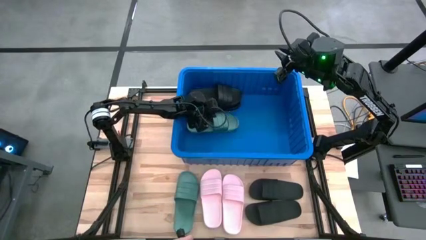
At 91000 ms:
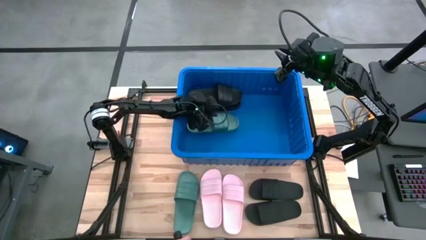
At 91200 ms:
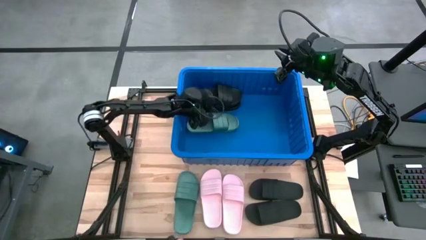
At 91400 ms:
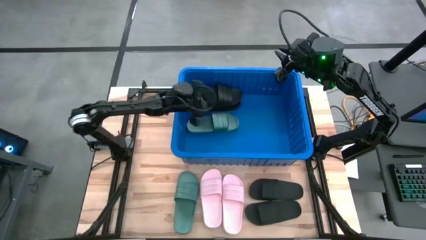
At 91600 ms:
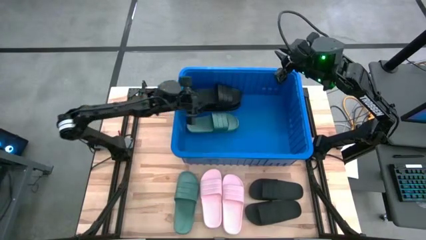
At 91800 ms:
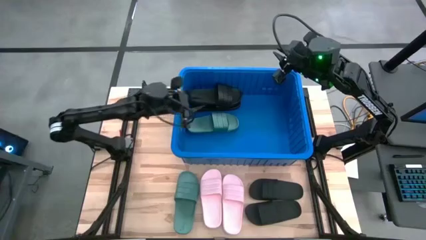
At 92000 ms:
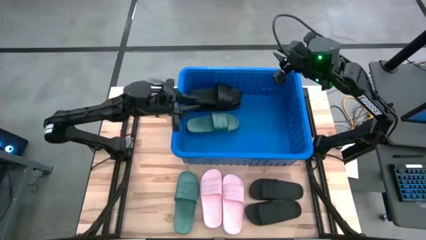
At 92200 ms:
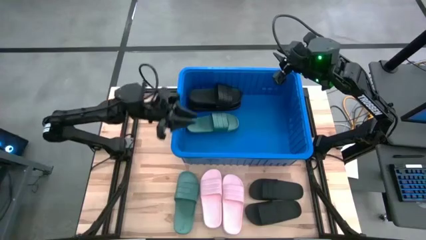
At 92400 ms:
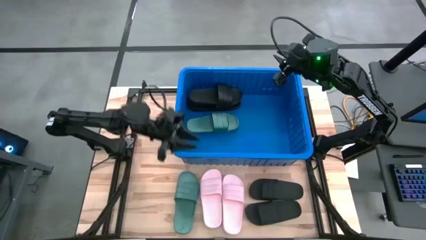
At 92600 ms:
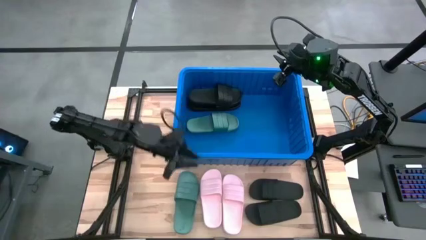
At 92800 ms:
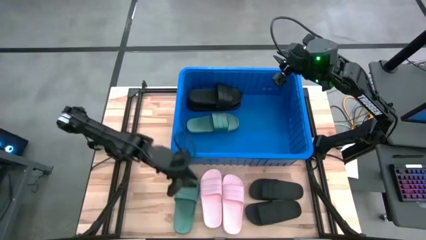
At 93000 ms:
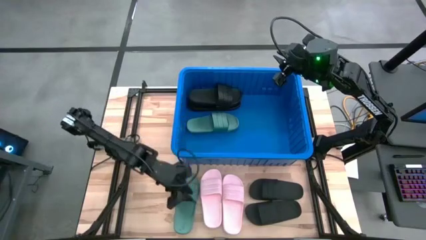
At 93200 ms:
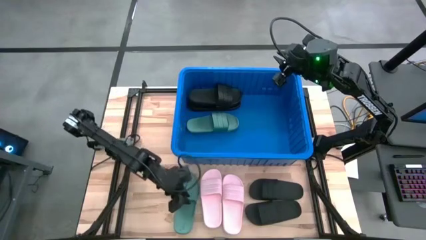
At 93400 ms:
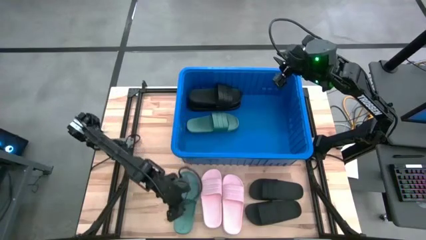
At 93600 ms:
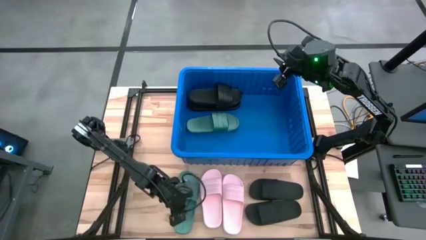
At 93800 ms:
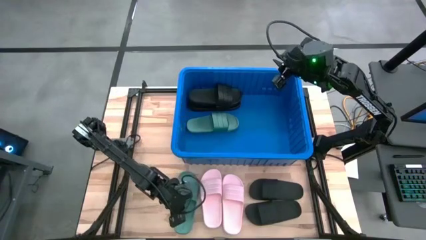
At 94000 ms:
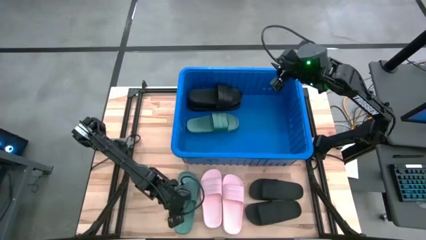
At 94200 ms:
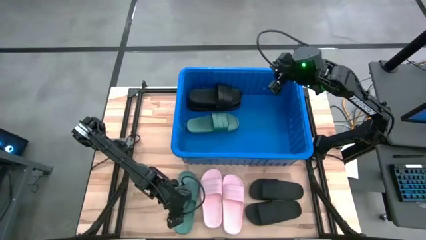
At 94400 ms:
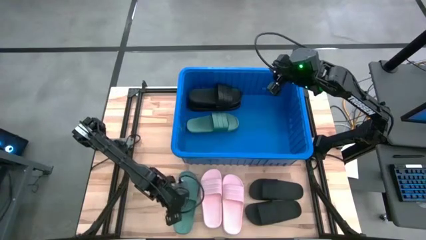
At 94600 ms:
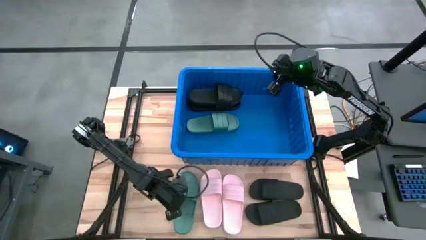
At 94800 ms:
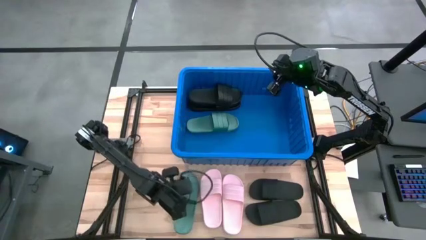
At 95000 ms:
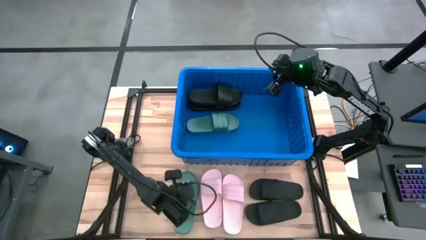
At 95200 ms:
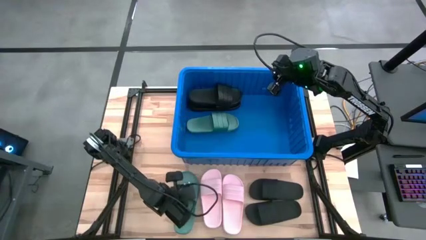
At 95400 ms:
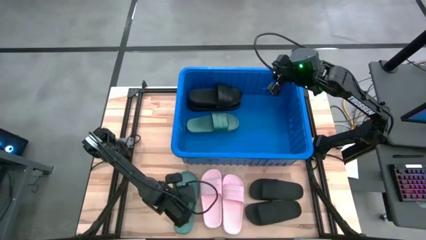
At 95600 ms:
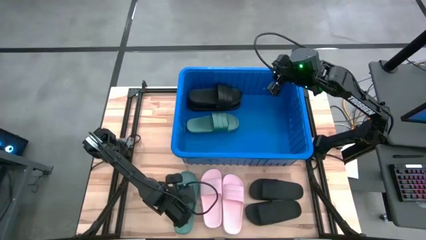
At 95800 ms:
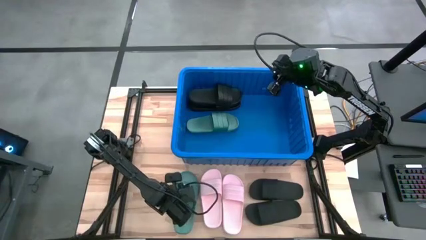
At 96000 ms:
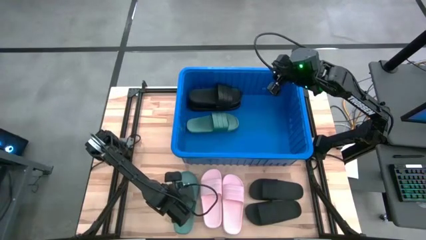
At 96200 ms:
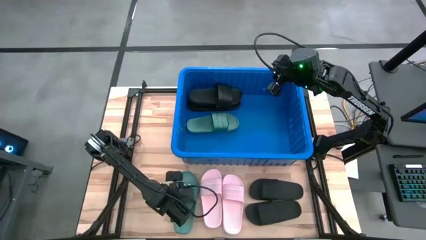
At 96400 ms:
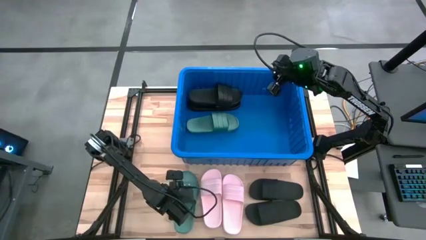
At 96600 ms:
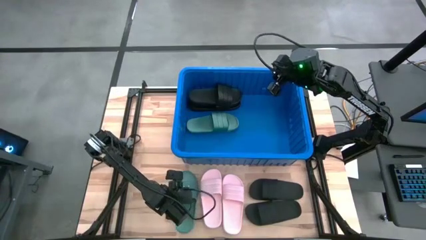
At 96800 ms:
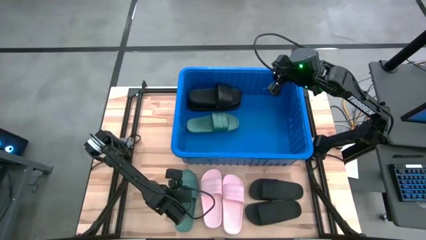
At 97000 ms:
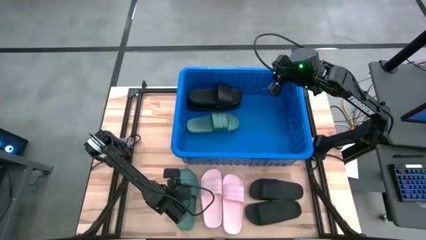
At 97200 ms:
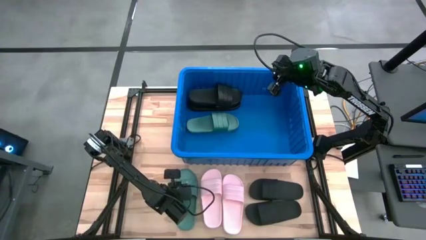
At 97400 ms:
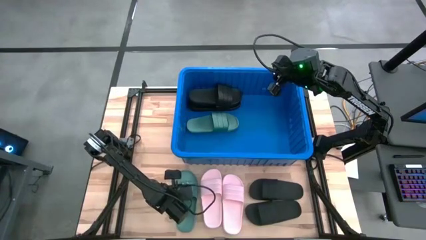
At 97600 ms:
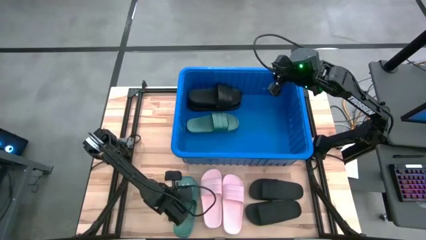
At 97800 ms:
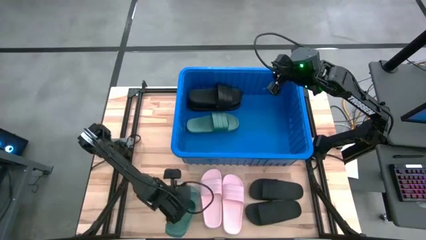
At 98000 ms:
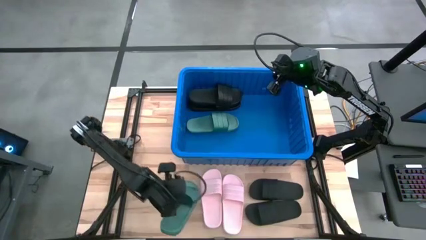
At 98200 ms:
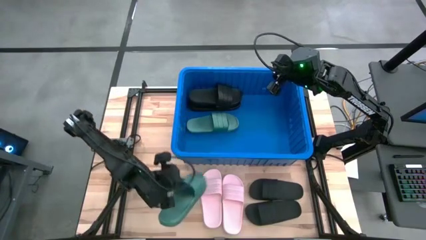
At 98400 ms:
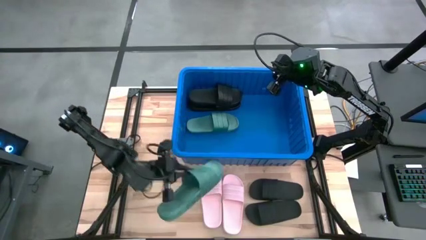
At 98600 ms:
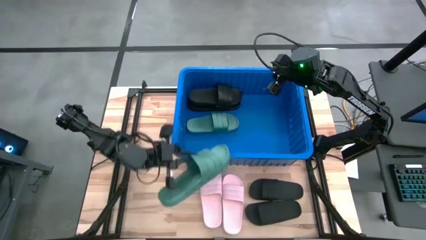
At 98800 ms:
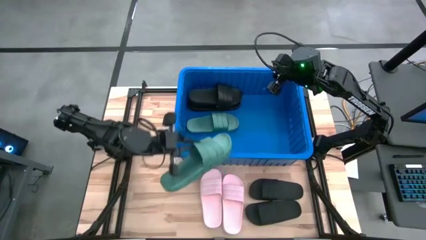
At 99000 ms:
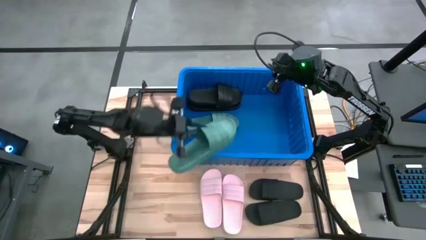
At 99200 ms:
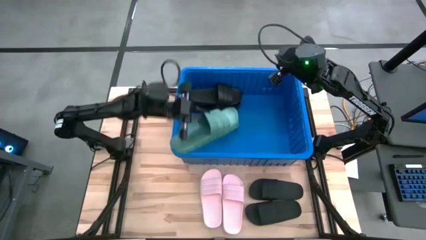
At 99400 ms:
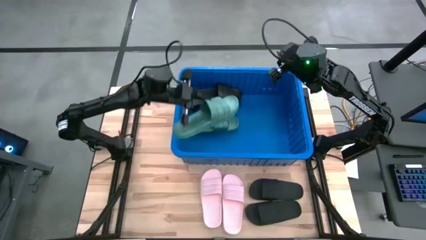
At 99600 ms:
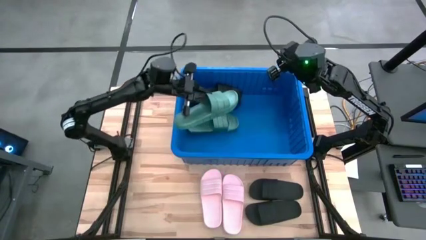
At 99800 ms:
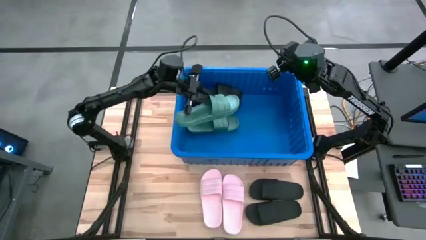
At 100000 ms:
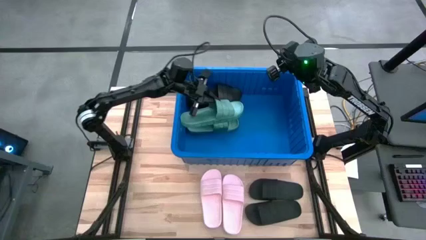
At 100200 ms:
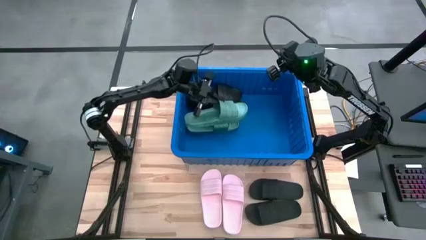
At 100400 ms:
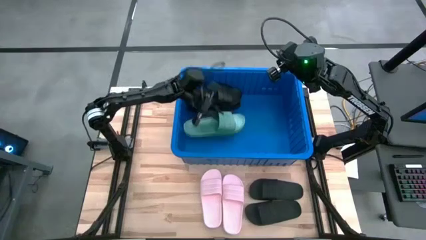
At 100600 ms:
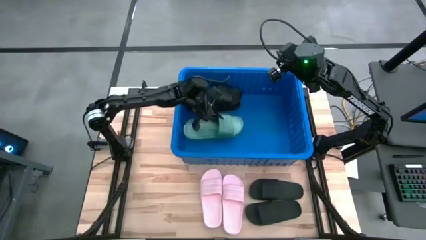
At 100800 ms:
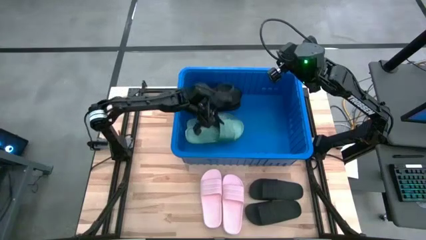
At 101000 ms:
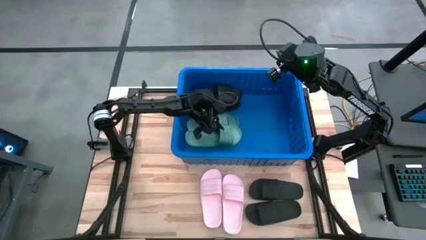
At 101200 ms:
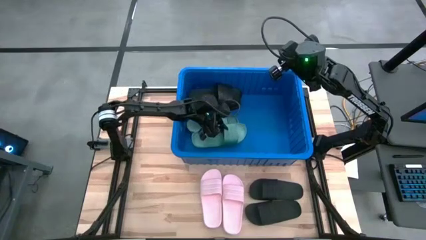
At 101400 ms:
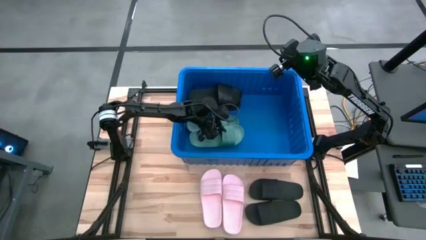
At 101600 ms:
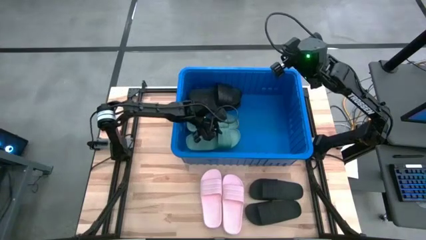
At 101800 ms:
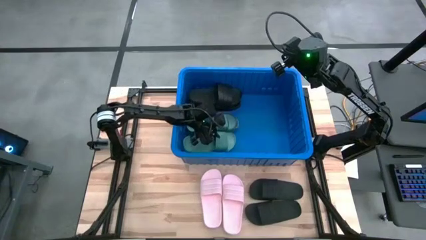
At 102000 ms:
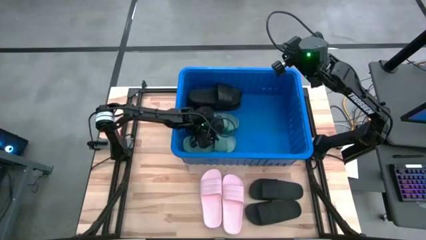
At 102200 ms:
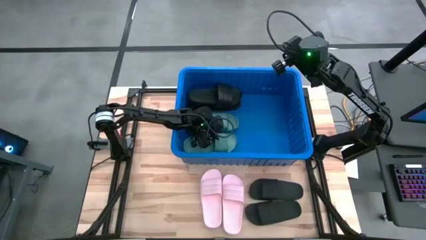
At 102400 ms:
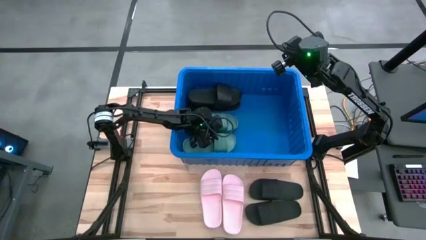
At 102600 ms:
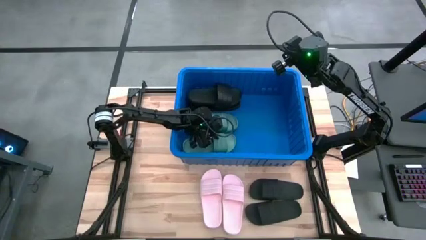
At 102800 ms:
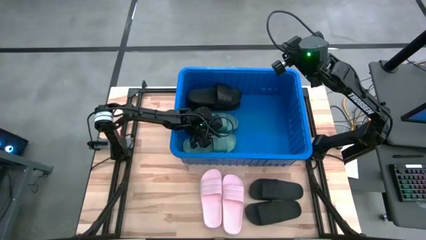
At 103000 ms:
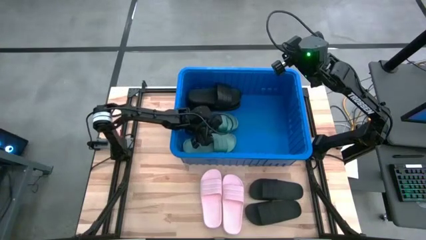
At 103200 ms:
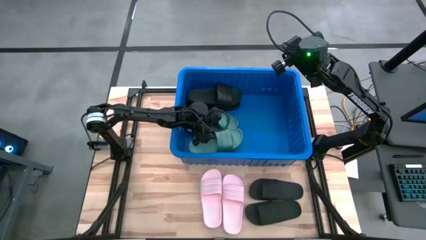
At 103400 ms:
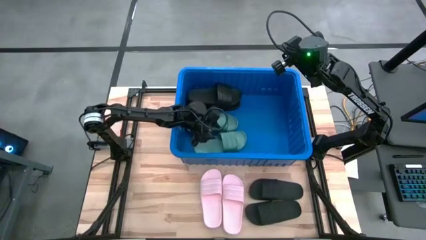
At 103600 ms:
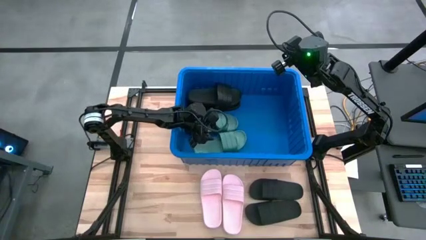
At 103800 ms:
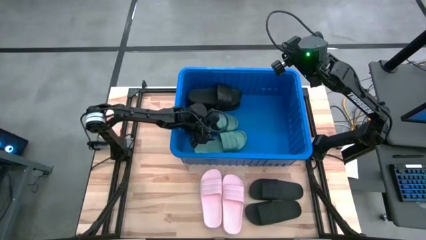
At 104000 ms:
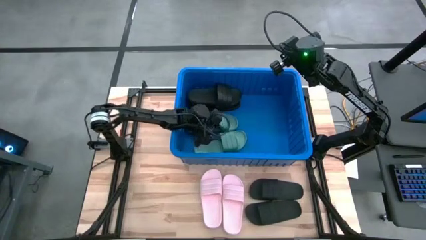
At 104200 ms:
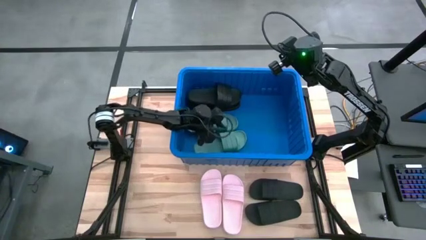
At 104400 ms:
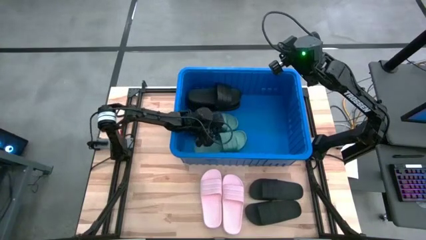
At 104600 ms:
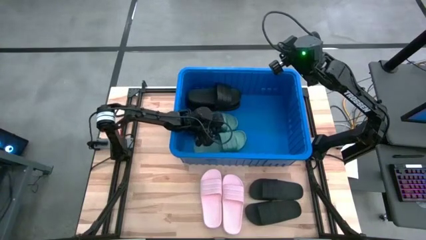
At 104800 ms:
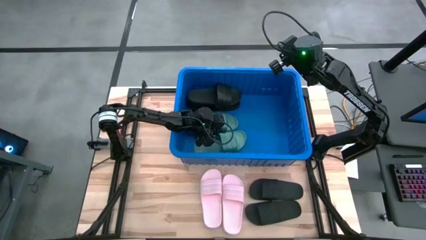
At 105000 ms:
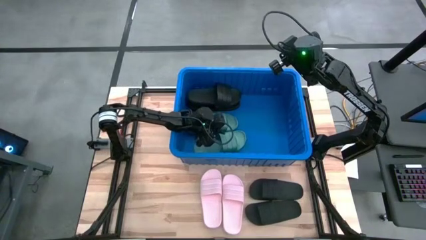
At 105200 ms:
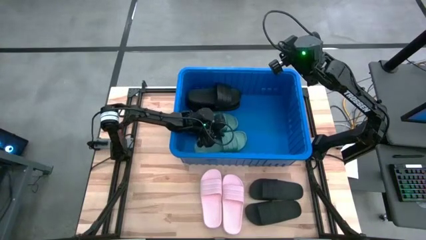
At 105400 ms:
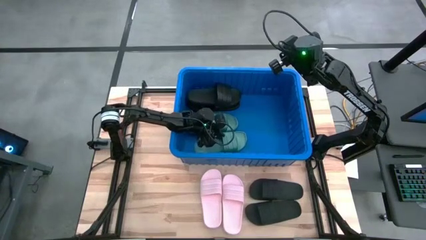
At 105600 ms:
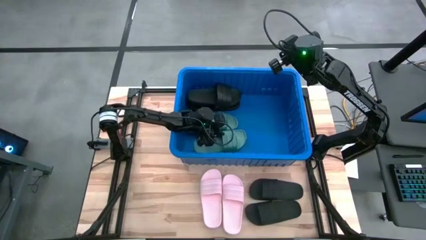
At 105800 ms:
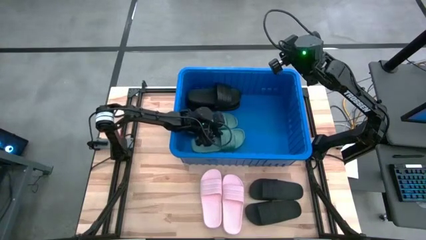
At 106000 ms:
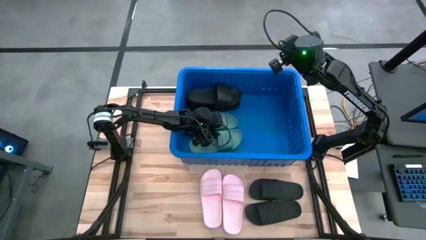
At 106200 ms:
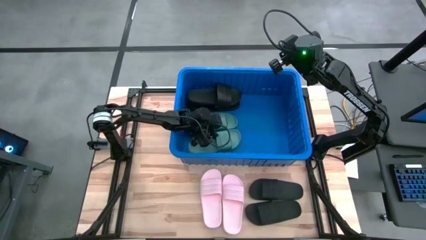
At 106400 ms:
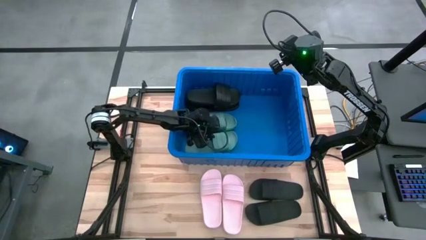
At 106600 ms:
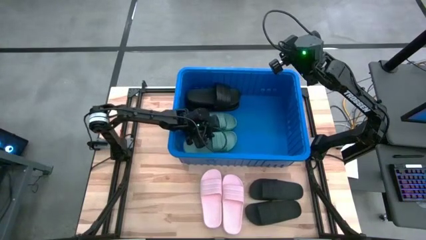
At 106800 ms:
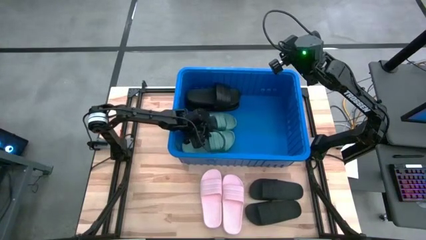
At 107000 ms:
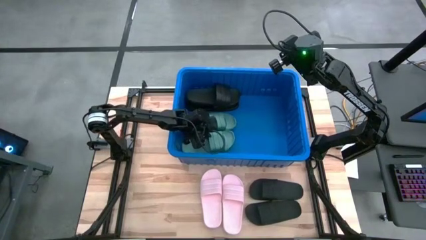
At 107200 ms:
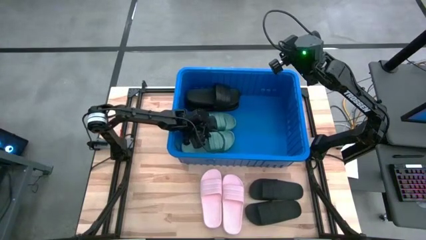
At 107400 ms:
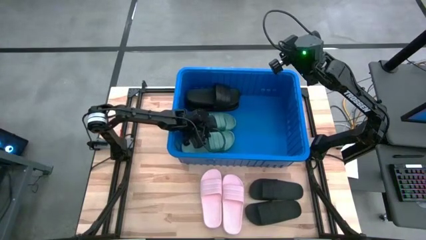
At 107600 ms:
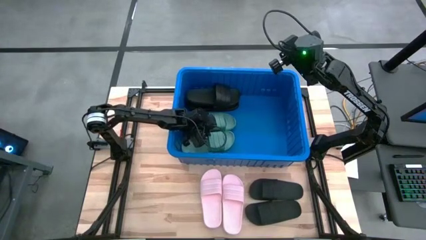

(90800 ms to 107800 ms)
Task: Pick and place slides into bin
Put the green slipper into the blue bin
